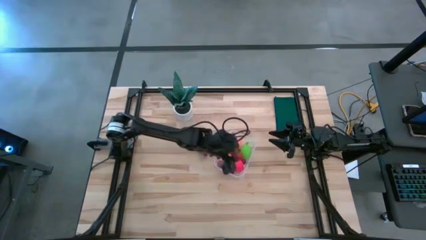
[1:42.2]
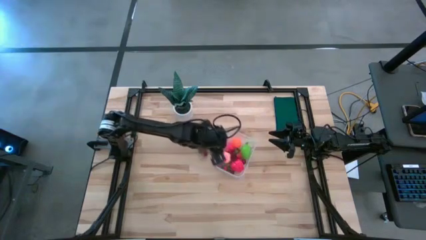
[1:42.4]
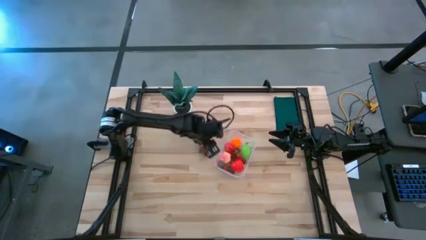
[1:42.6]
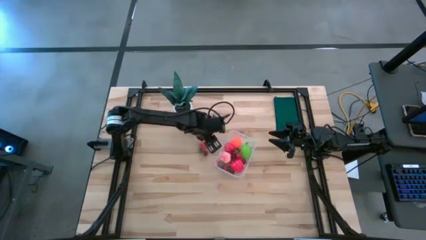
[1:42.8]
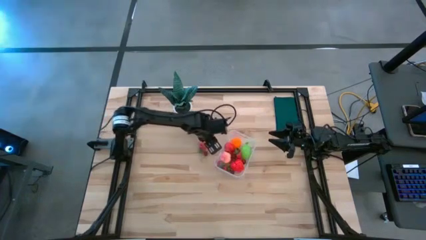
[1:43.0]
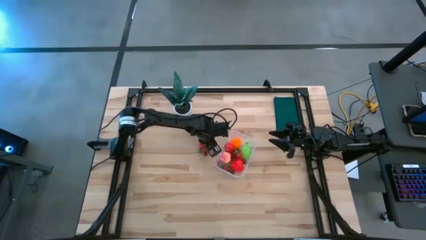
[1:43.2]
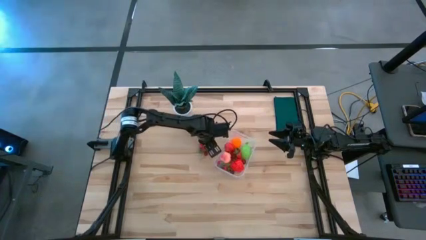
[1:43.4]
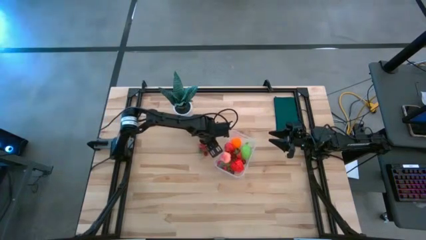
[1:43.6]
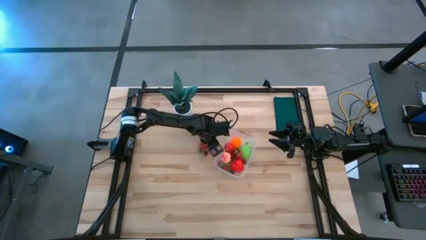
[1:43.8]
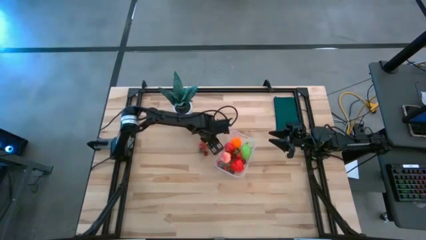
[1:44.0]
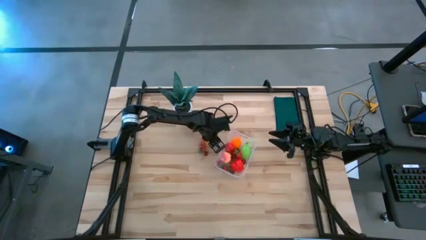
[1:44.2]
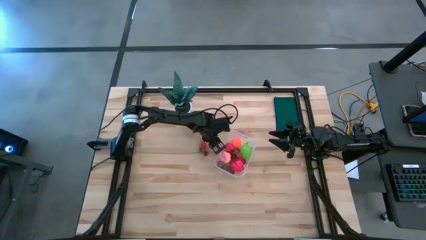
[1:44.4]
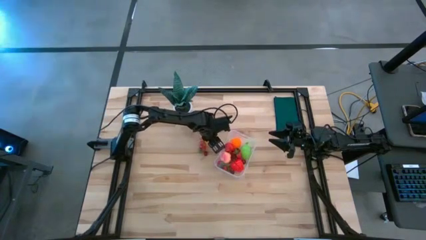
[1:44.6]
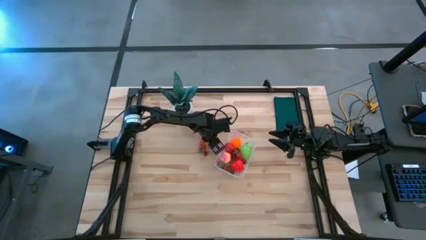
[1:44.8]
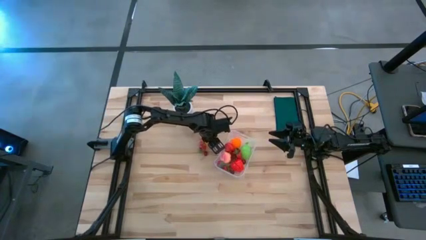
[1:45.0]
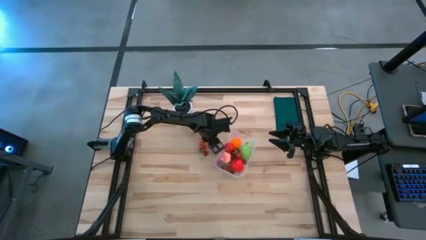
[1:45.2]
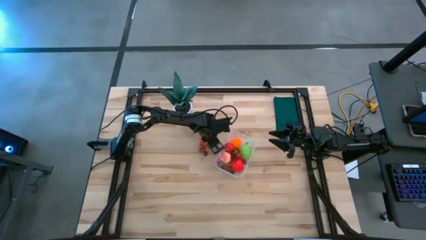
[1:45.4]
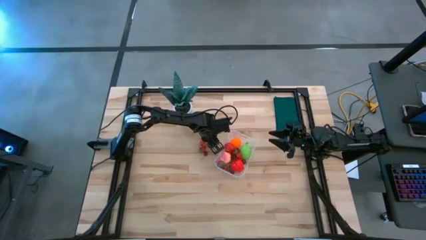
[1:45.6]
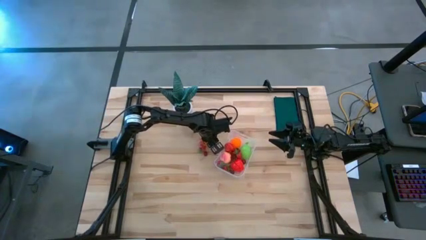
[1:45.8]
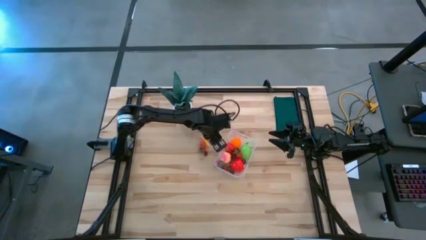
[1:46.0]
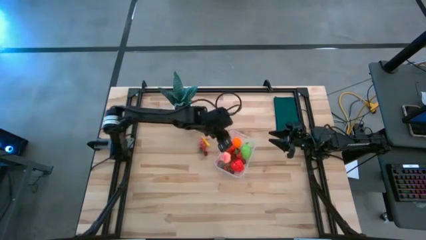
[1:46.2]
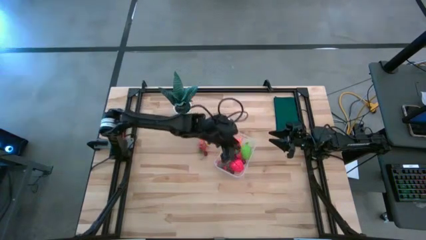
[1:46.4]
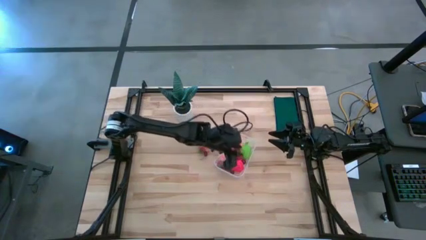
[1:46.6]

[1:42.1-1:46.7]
Task: Pick and placing Produce into tupperware
Put the red cherry into the container

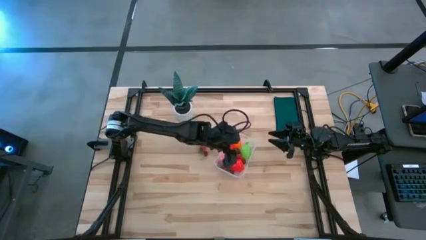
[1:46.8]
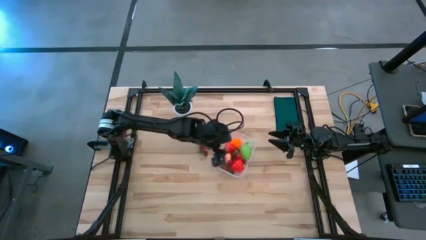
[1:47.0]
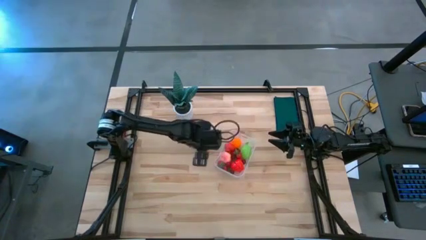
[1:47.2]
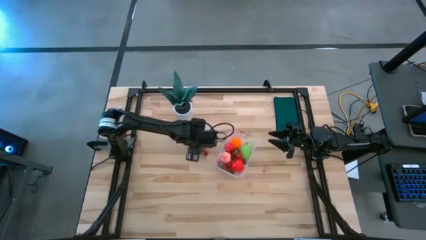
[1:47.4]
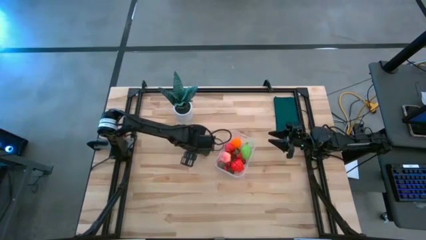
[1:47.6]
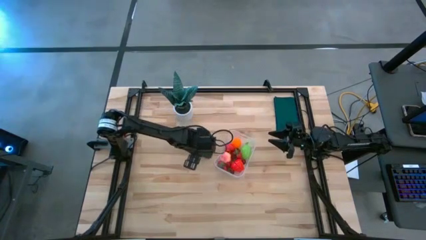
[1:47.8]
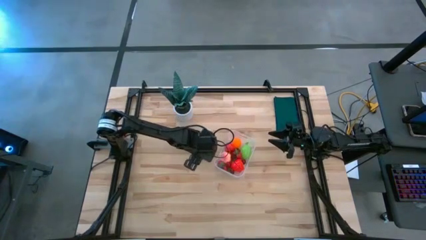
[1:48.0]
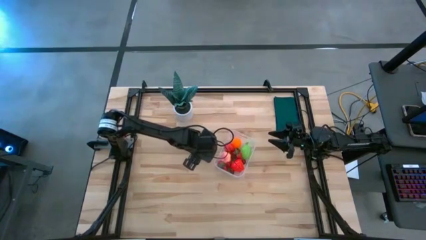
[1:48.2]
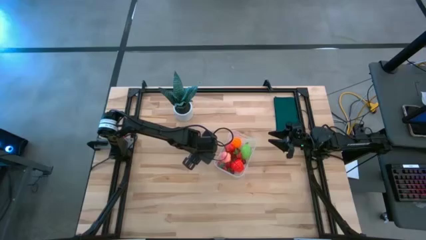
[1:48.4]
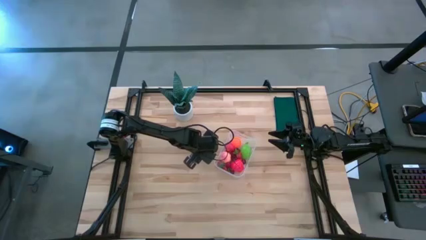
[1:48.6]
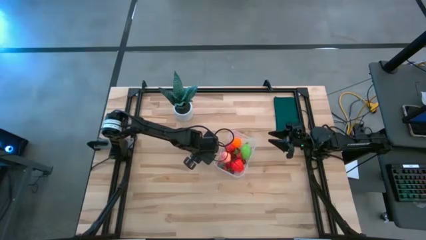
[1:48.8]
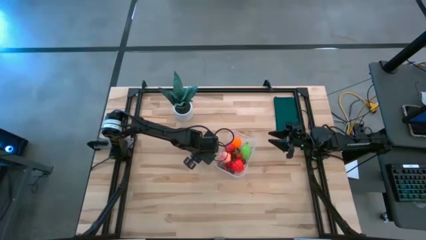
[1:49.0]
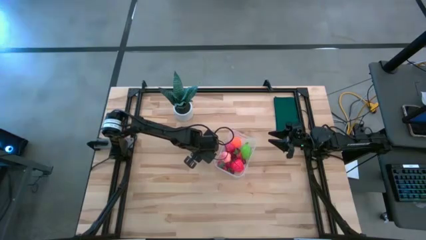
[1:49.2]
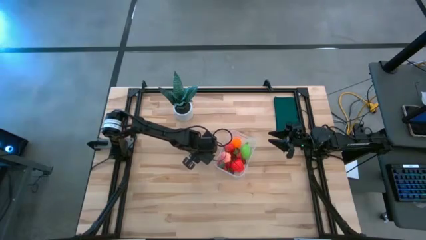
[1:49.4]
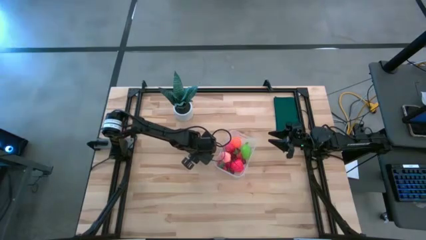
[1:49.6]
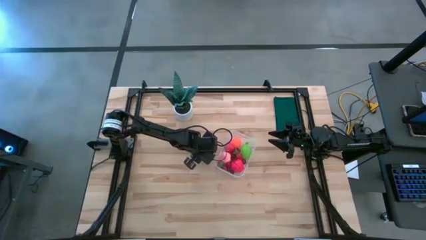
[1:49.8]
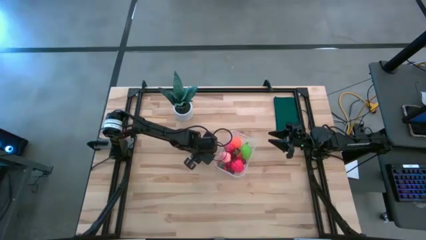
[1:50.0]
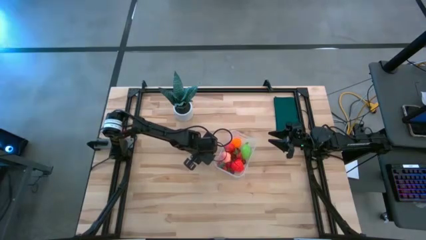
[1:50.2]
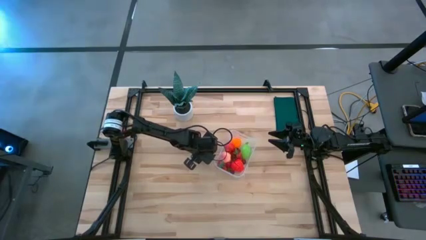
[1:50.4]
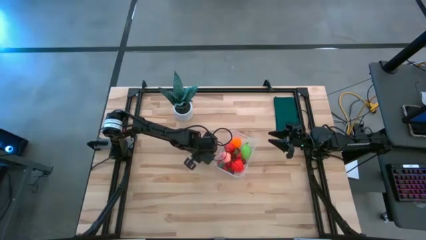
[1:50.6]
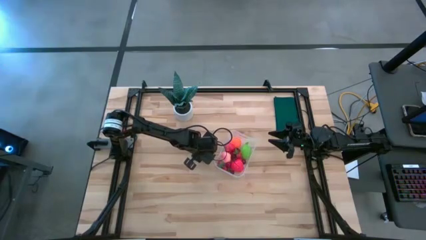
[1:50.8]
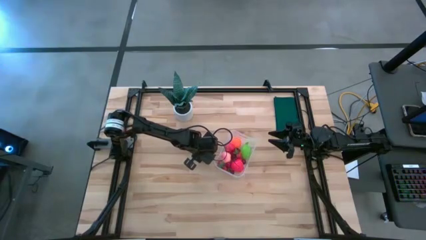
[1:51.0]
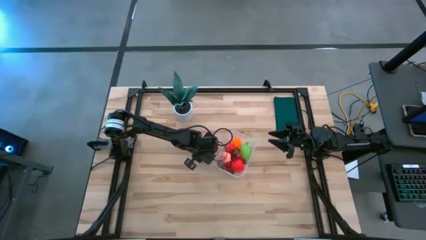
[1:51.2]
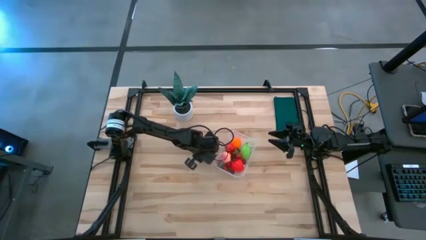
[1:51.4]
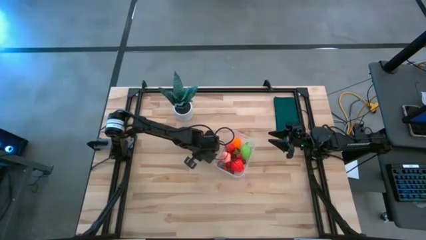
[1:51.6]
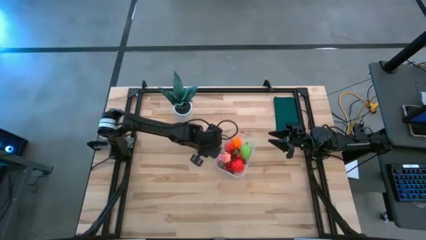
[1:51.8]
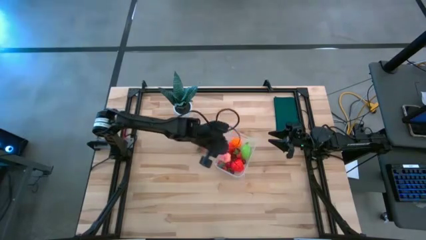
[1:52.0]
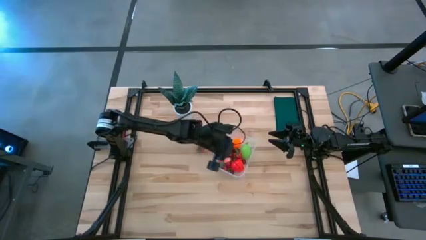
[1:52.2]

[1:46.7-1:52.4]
Put the red cherry into the container

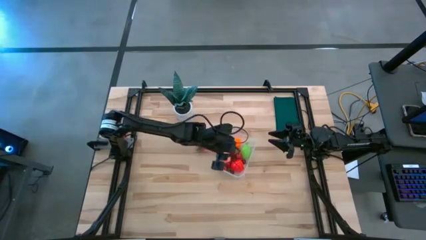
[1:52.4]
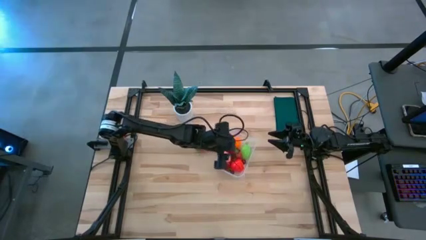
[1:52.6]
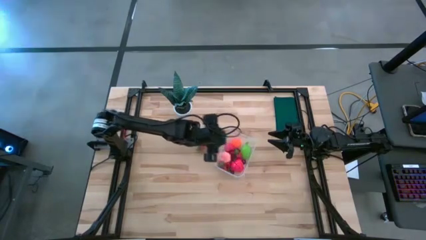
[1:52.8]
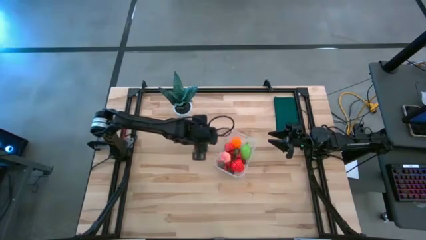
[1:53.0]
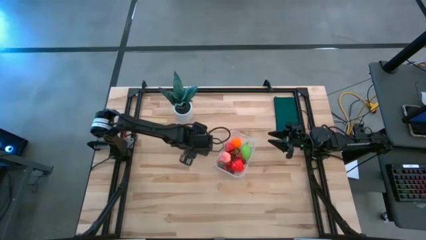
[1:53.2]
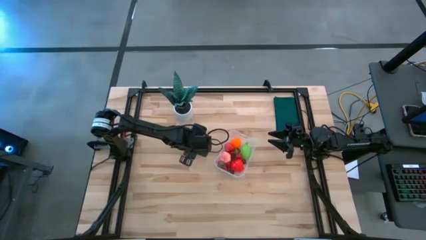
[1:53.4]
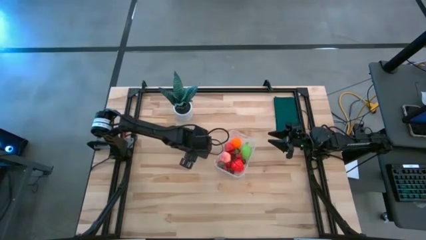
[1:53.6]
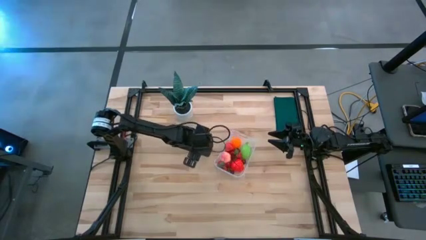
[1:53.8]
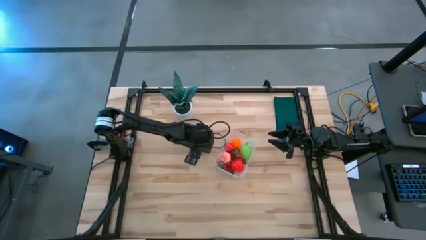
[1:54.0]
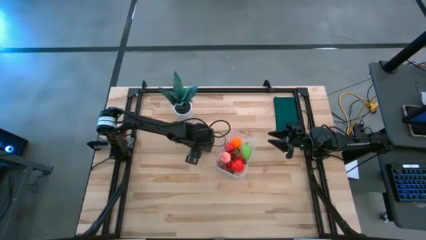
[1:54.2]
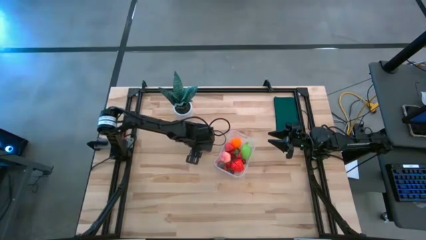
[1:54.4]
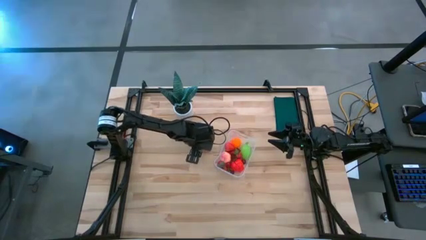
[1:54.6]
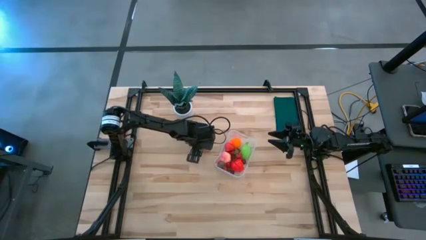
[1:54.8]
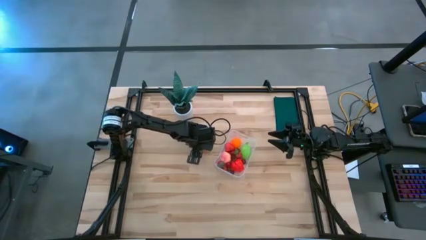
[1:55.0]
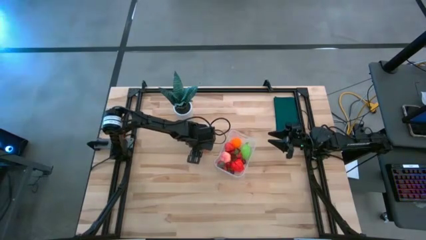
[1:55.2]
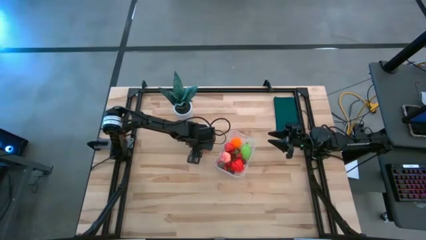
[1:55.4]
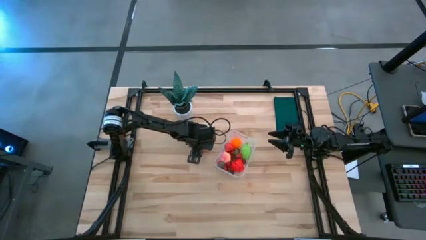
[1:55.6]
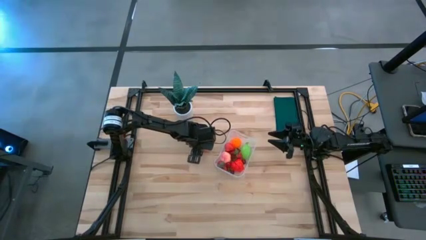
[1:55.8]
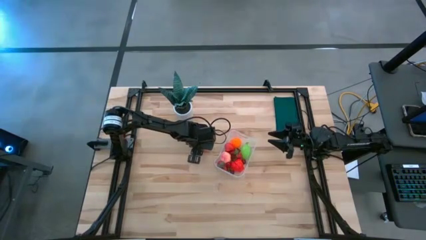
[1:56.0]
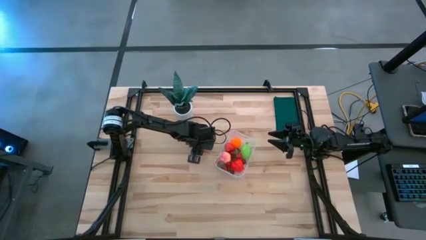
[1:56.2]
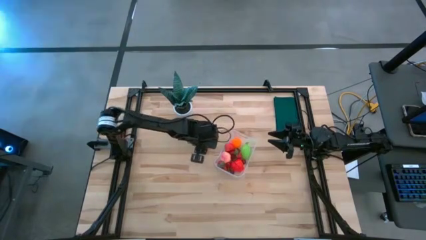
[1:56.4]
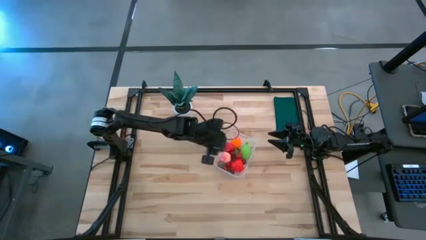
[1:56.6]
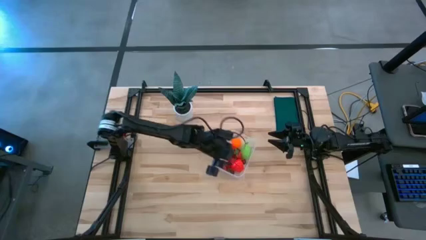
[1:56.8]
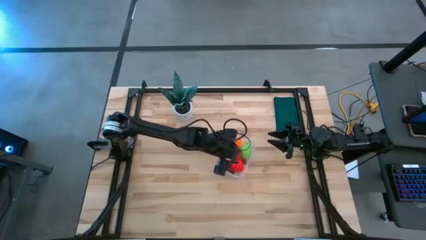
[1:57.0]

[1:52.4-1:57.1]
Put the red strawberry into the container

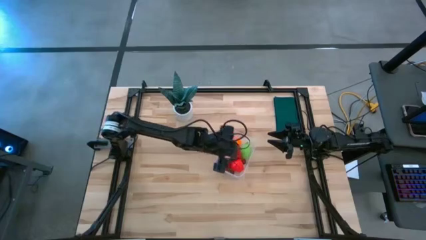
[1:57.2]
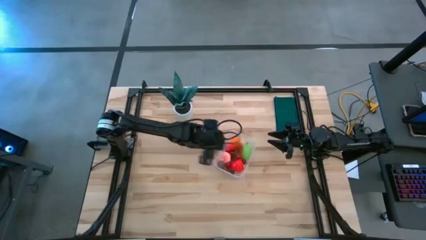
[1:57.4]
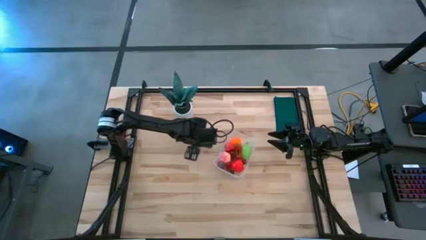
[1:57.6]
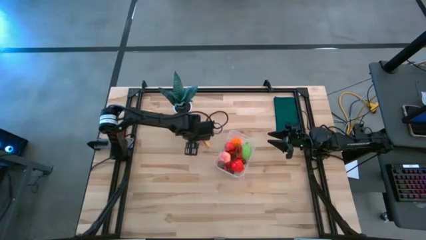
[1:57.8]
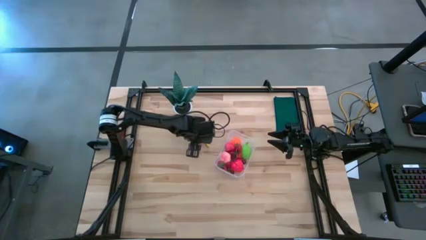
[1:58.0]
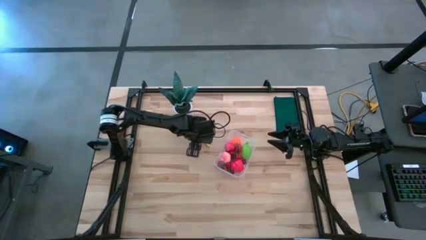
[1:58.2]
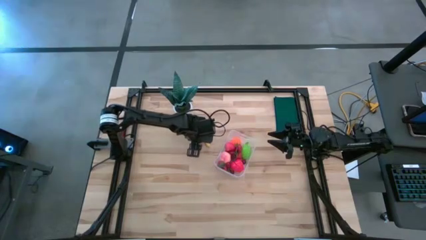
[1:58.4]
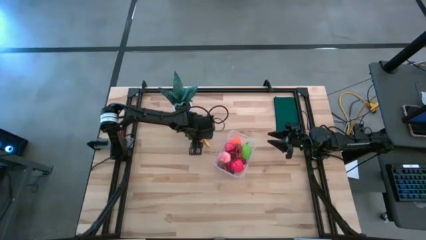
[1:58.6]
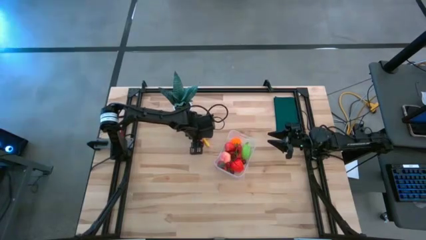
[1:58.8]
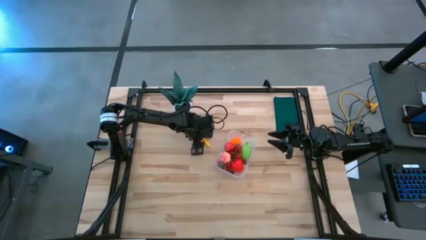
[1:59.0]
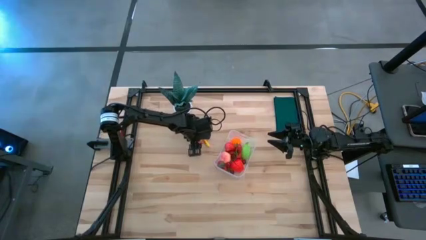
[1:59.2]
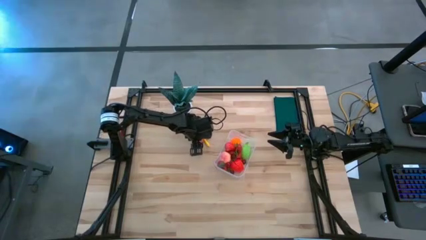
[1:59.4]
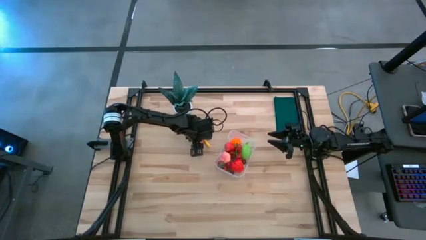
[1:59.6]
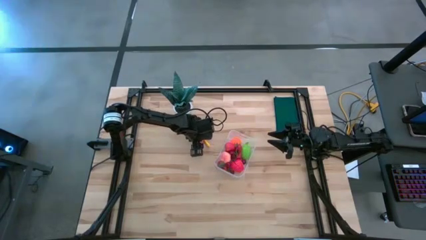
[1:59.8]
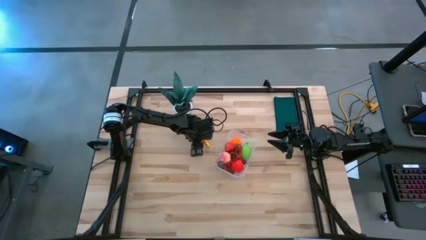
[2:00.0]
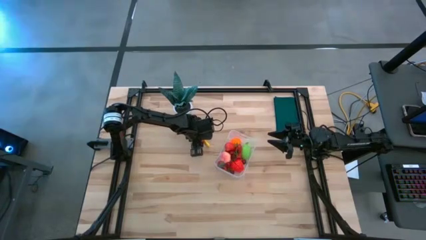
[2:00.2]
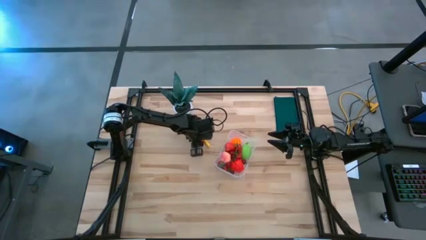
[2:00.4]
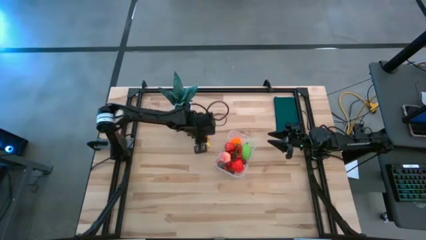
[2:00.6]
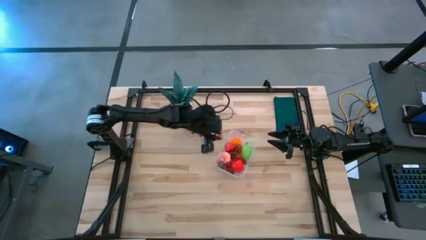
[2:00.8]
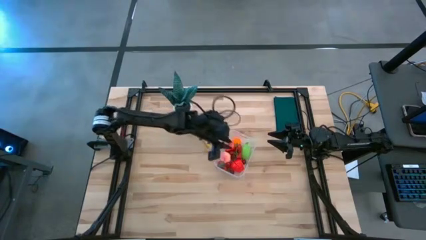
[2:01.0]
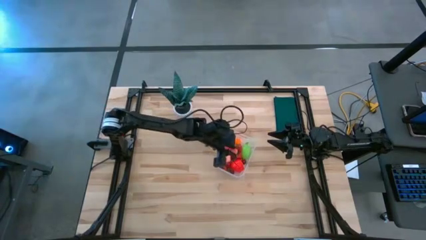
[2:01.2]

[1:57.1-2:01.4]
Put the pink peach into the container
